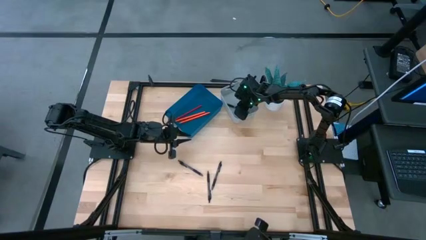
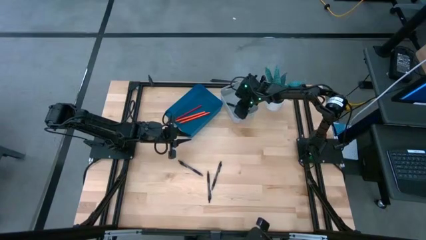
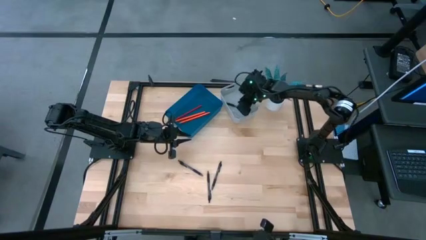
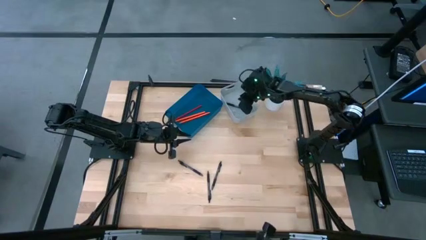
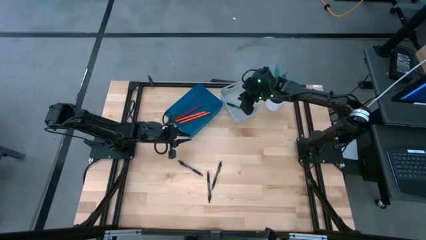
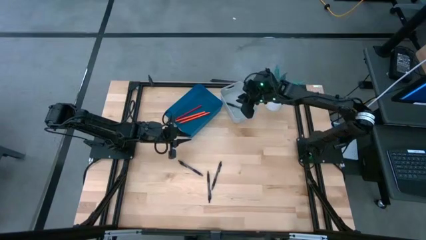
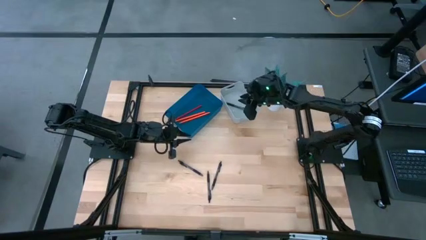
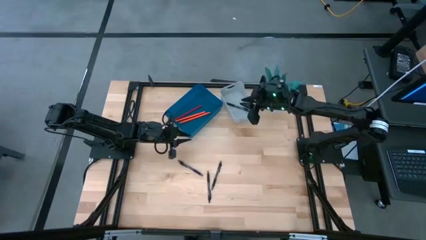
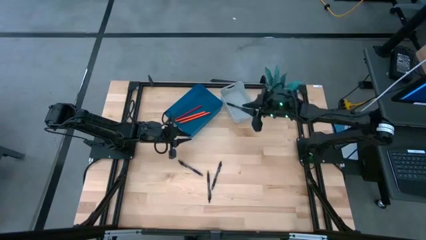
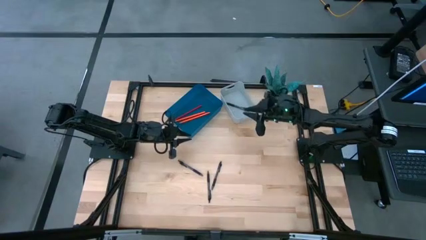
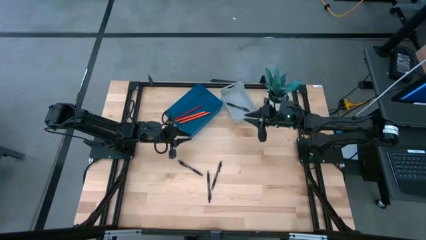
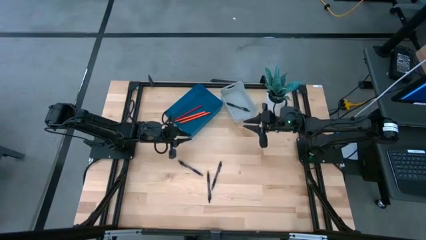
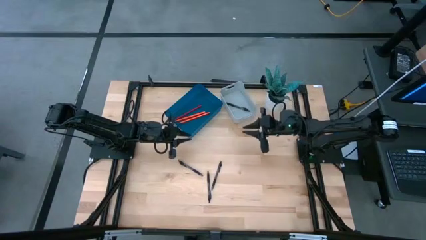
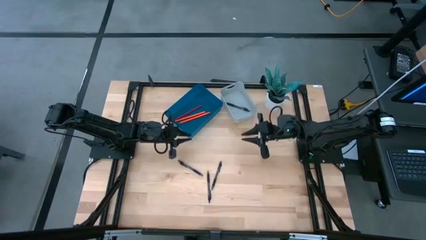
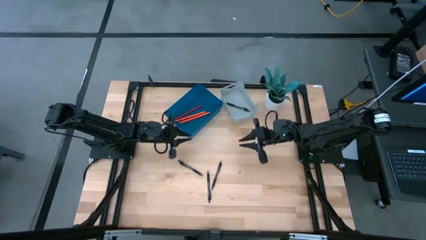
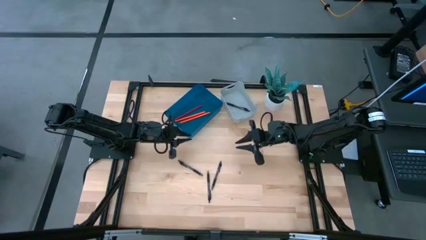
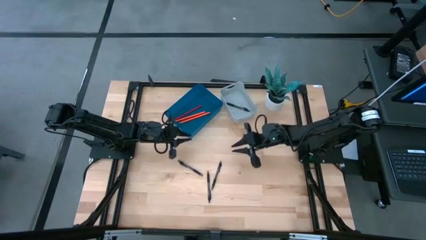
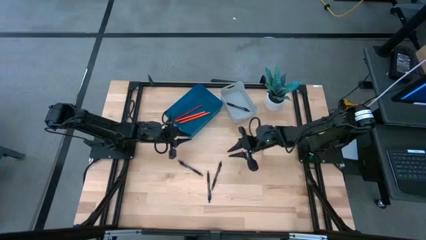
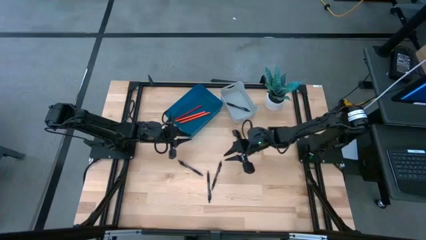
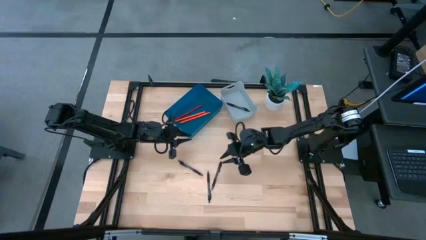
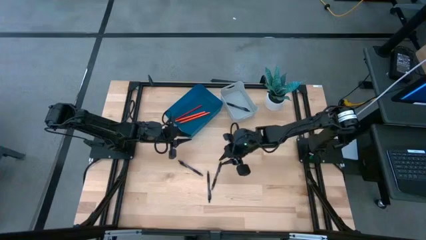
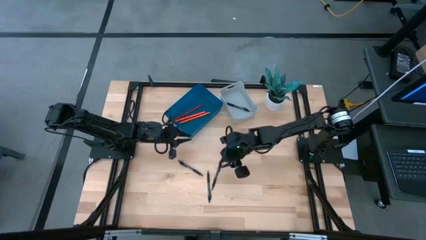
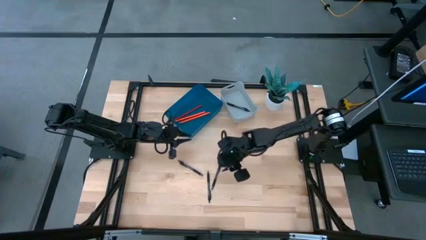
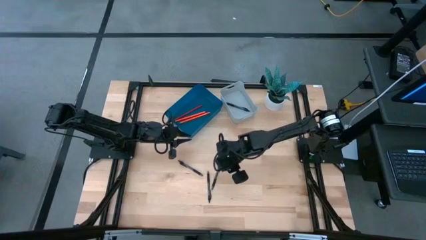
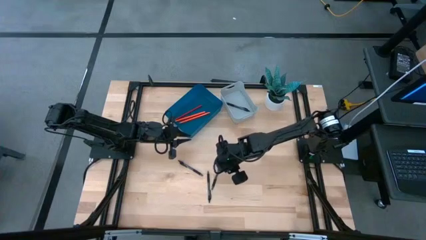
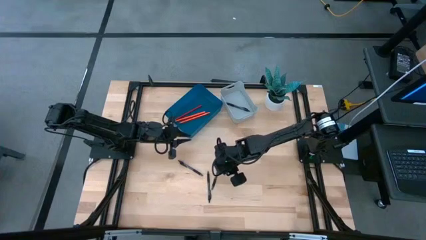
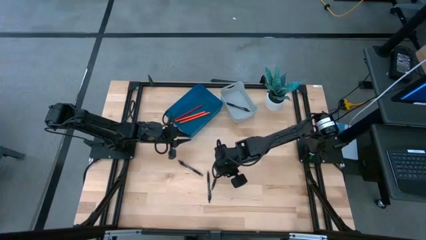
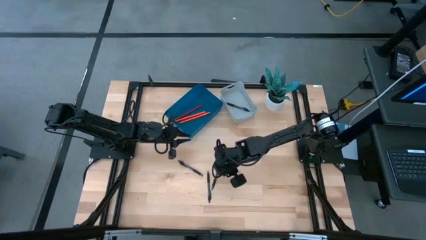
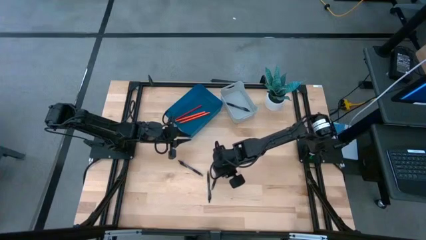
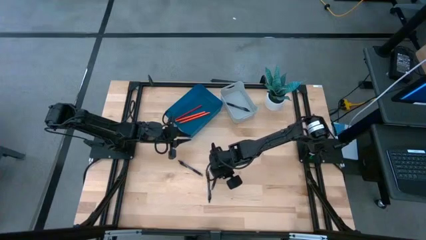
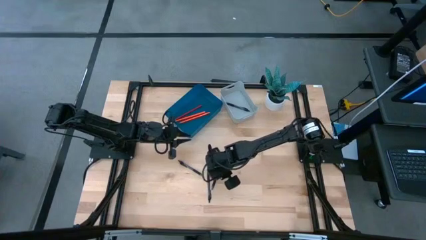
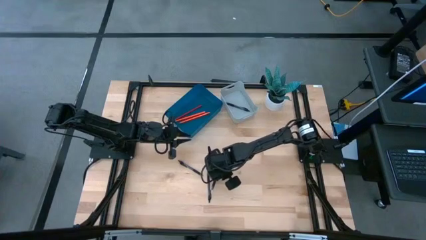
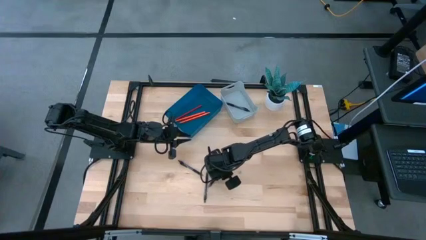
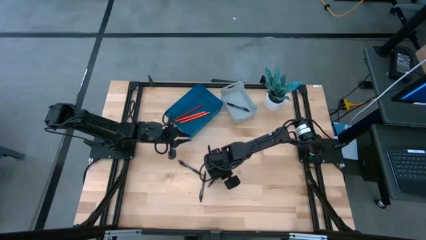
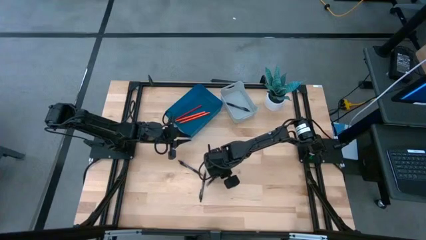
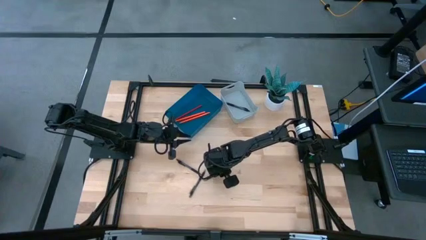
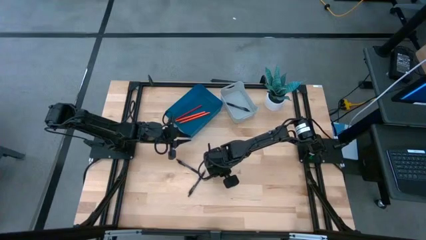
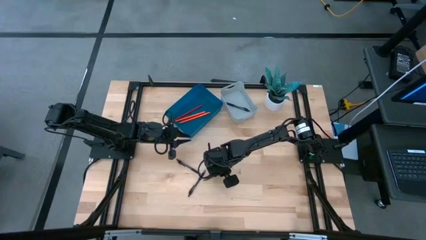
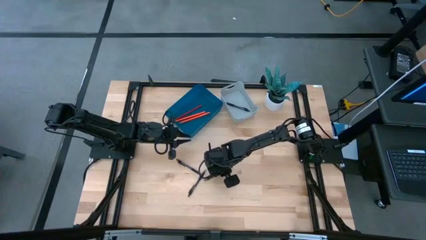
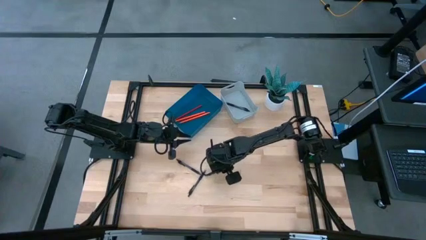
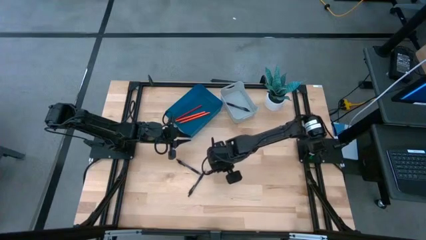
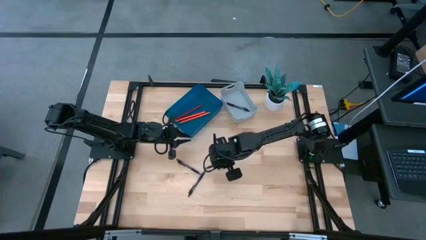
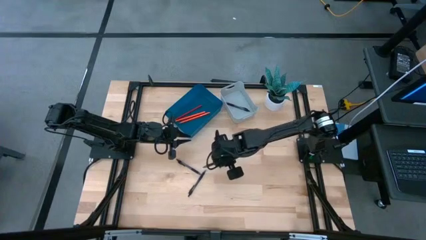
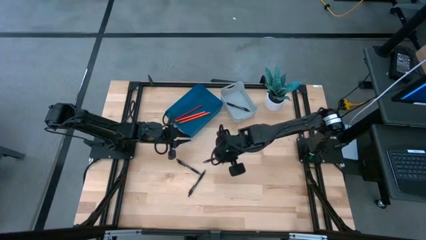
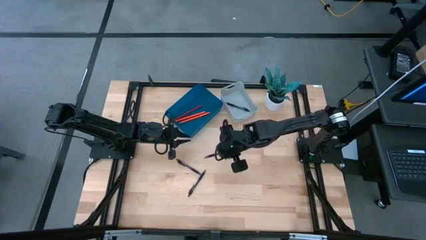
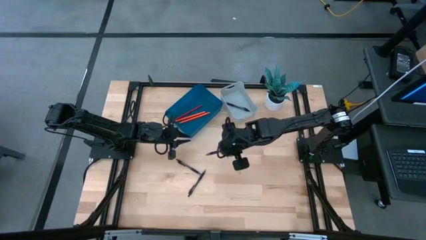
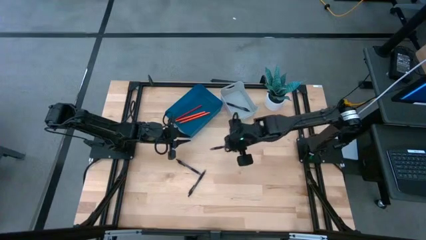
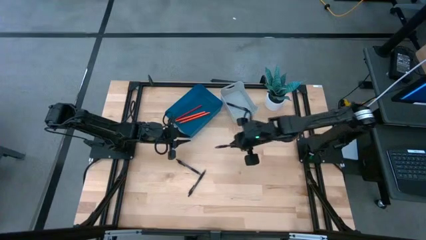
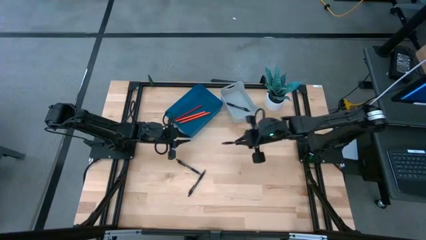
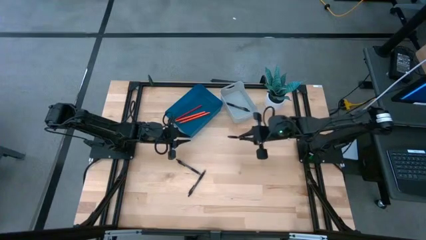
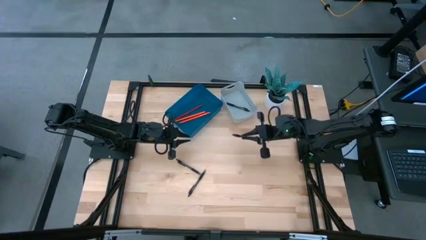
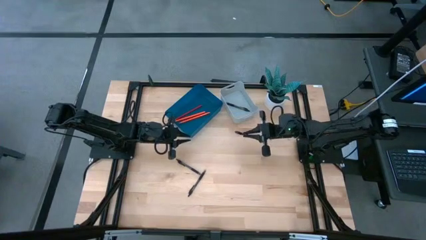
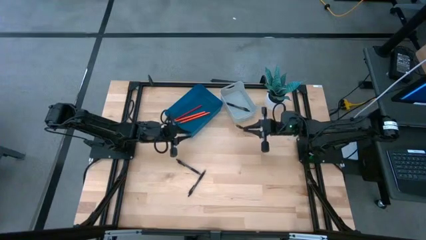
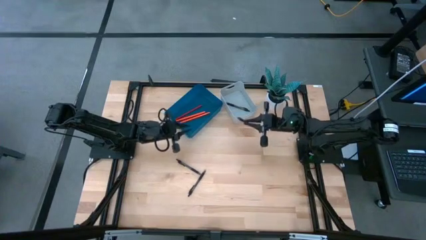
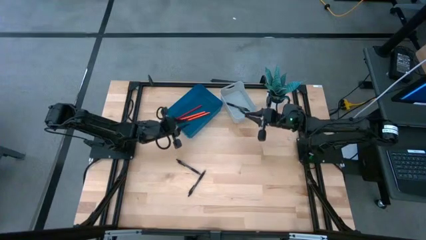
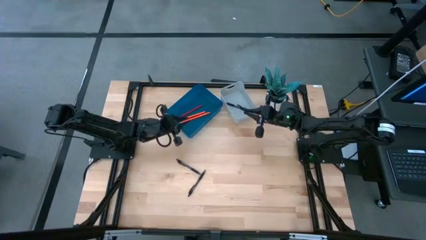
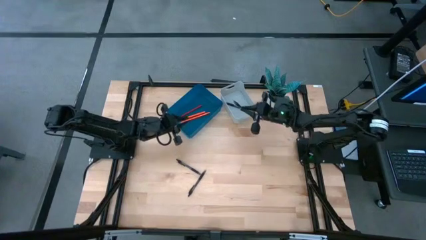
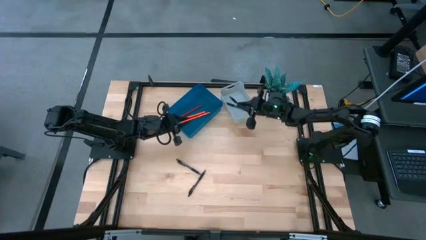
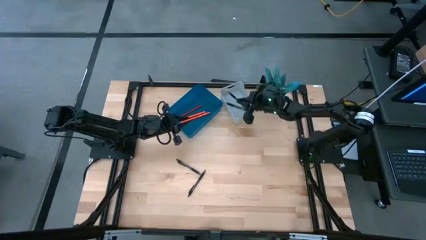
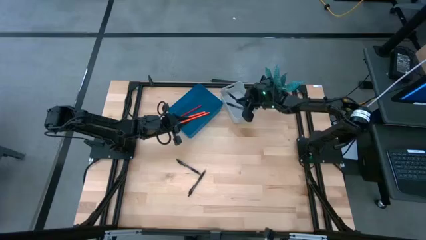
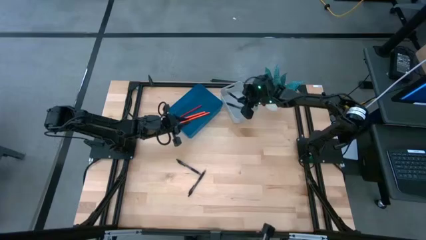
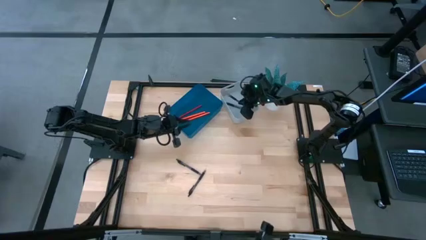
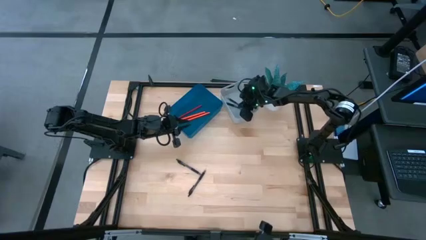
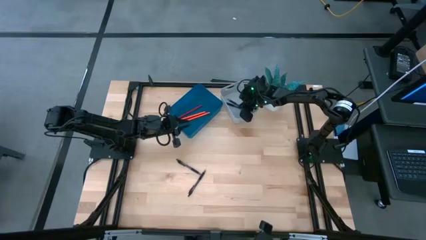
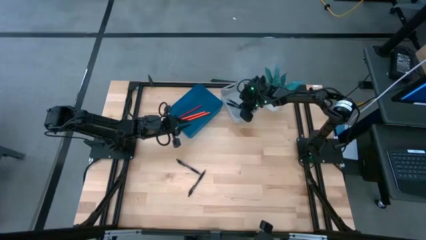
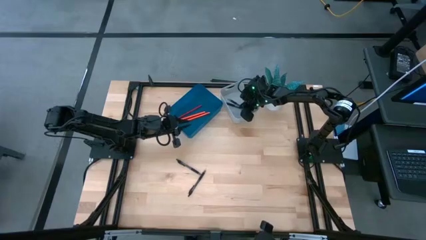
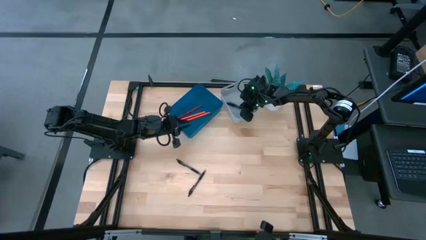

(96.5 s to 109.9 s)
Task: Sort pens & pencils
Put the black pen into the gray bin

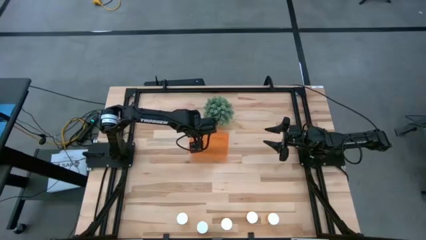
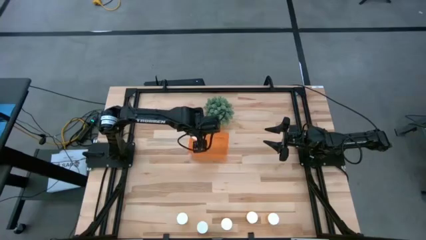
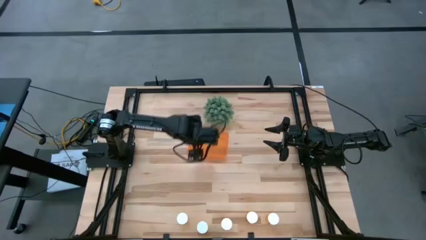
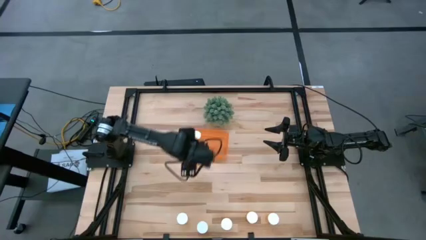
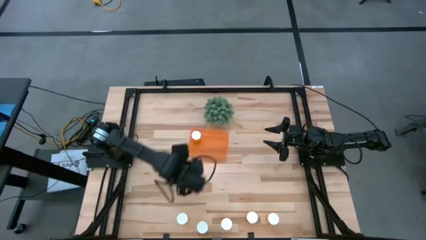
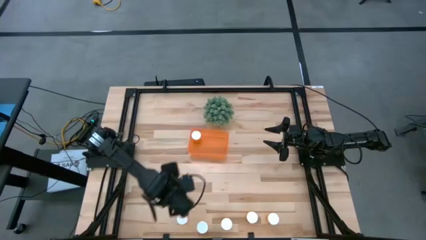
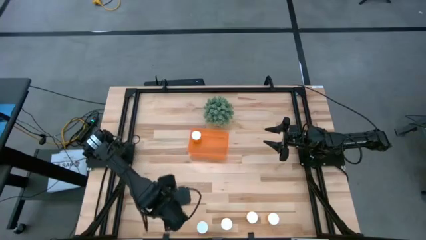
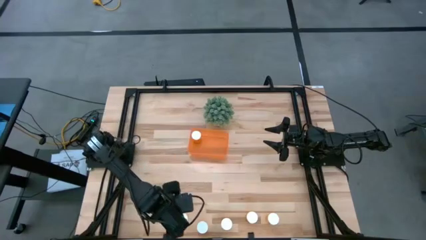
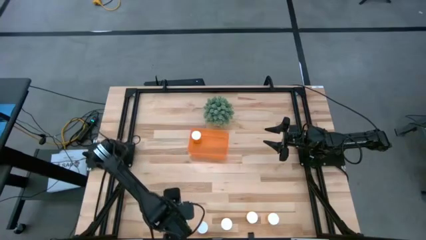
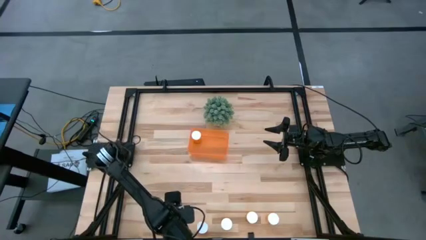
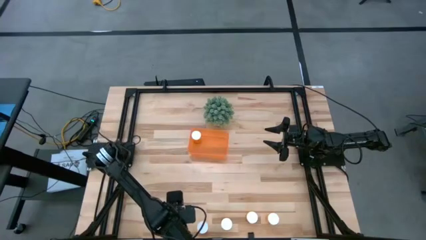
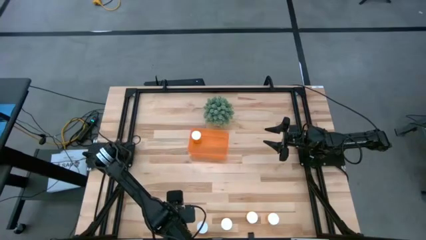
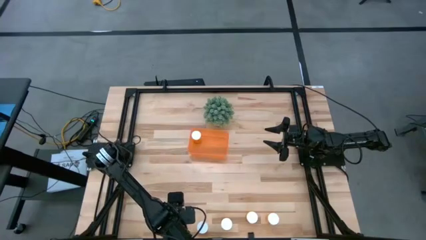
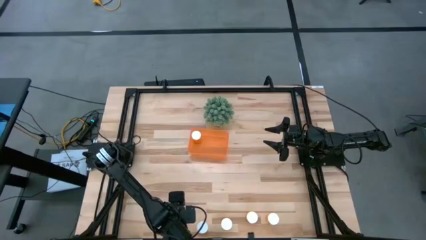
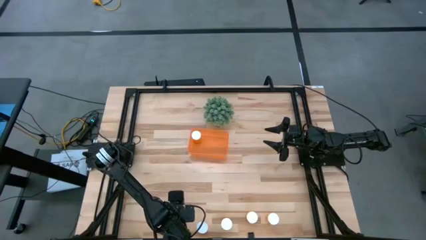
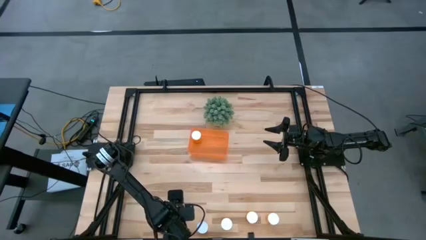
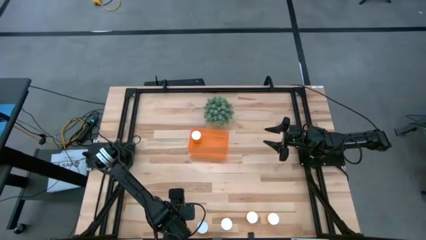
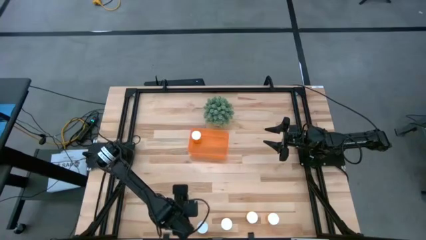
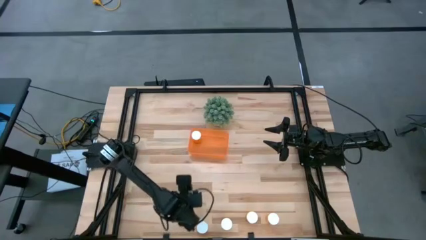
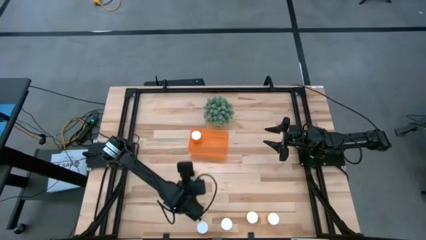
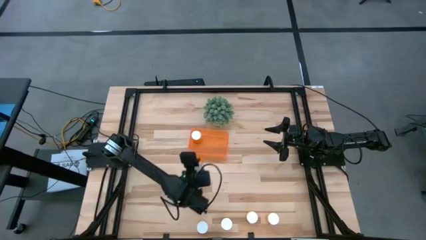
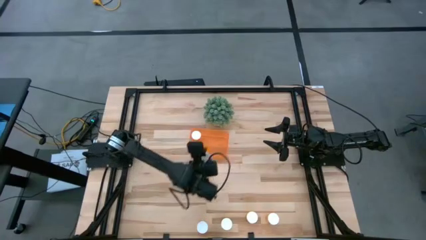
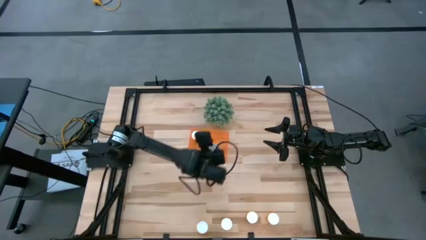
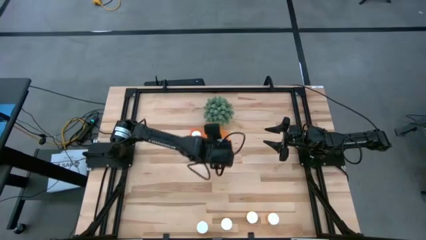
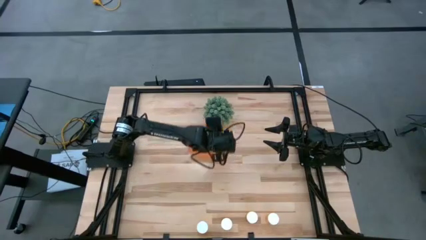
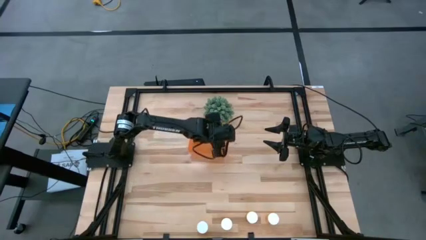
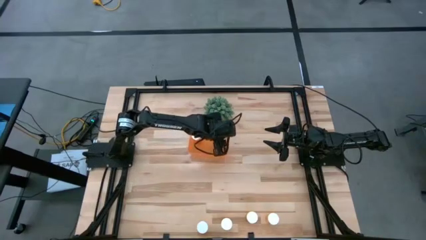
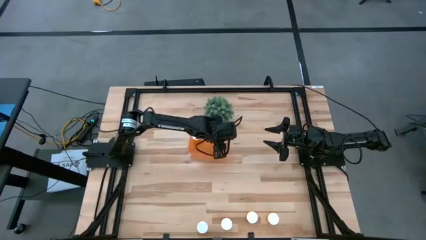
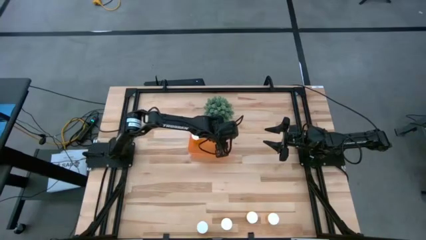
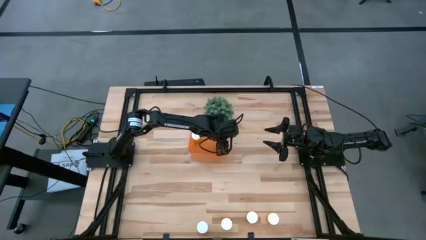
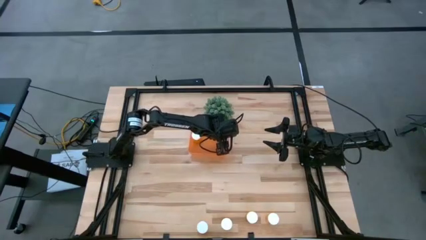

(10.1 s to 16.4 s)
Task: Pick and place pill bottles into a basket
Put the orange pill bottle into the orange bin
